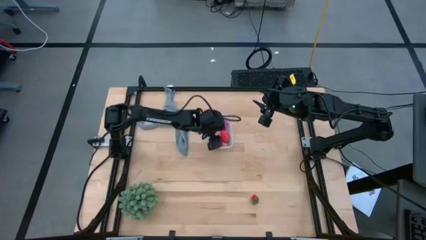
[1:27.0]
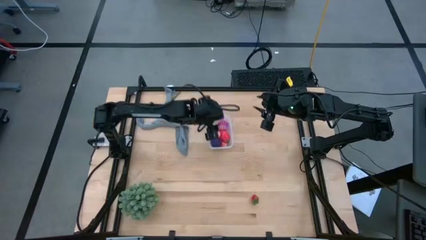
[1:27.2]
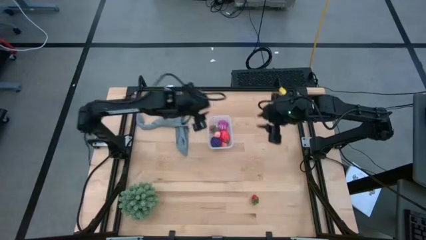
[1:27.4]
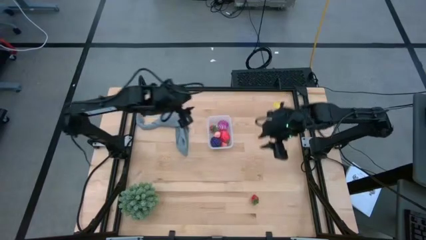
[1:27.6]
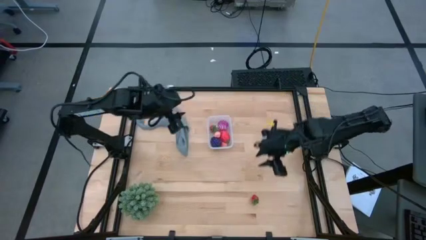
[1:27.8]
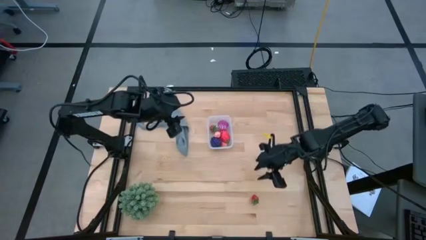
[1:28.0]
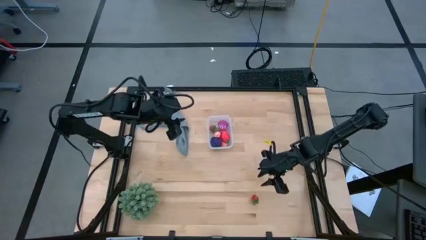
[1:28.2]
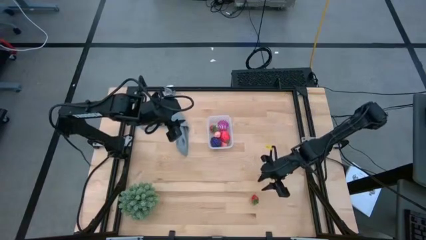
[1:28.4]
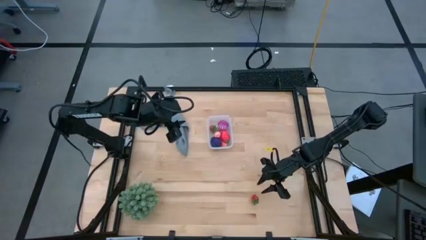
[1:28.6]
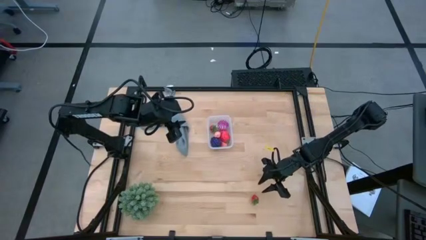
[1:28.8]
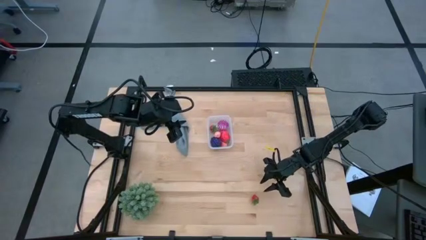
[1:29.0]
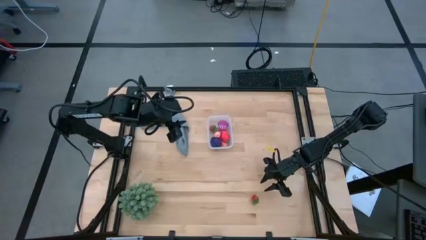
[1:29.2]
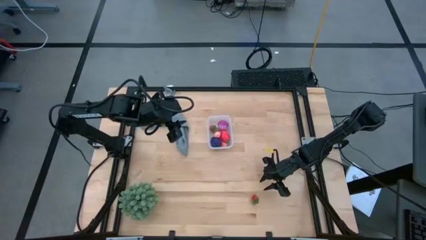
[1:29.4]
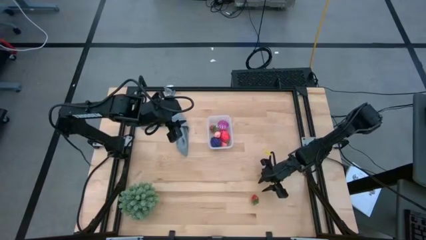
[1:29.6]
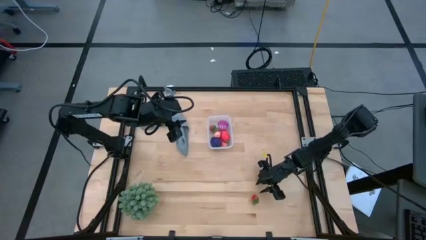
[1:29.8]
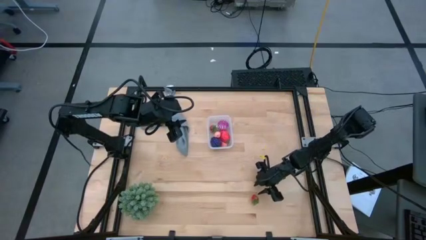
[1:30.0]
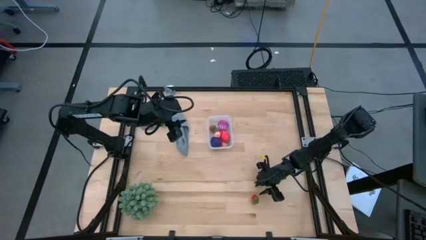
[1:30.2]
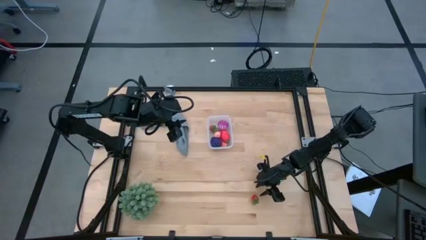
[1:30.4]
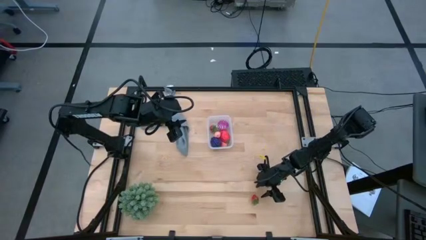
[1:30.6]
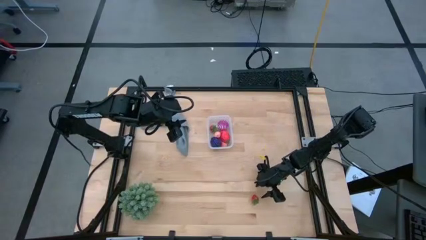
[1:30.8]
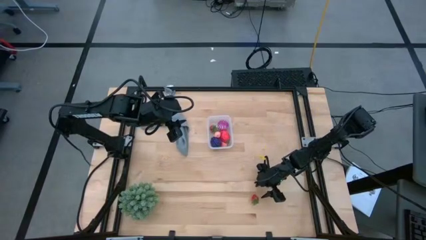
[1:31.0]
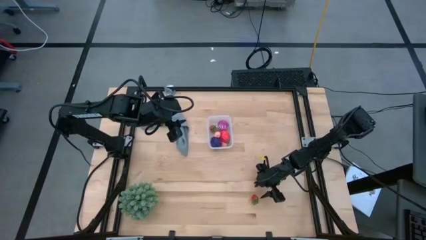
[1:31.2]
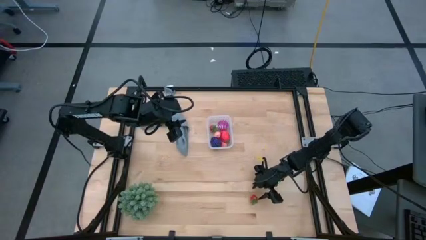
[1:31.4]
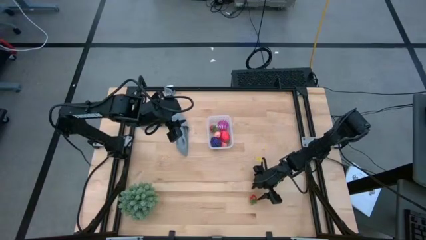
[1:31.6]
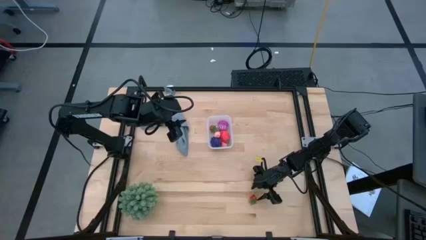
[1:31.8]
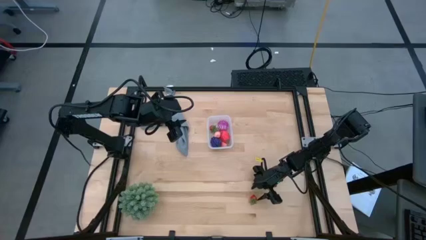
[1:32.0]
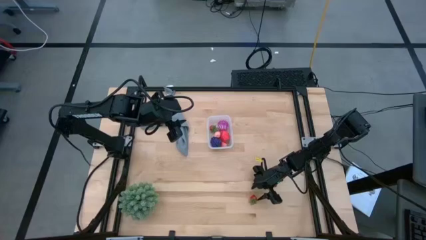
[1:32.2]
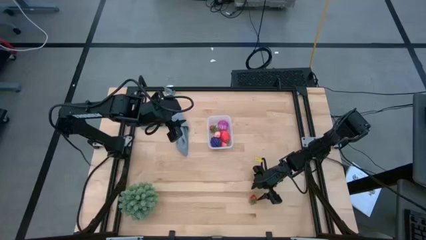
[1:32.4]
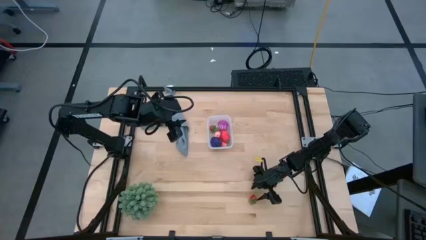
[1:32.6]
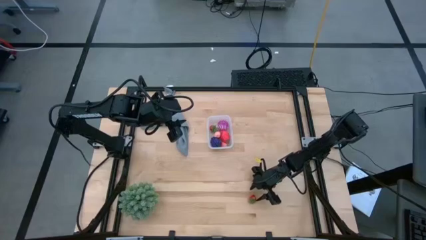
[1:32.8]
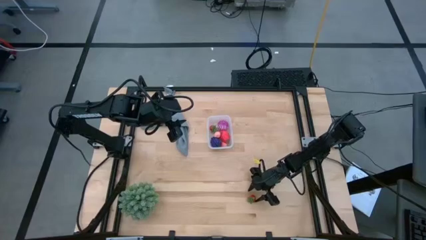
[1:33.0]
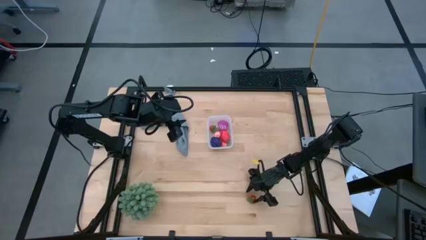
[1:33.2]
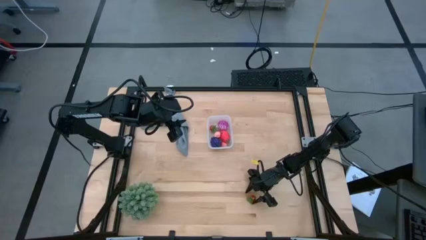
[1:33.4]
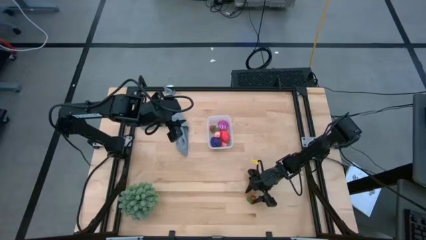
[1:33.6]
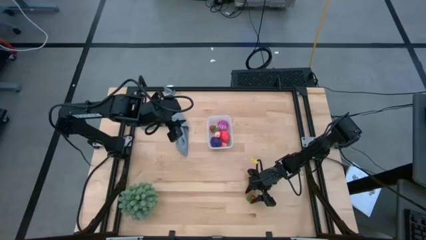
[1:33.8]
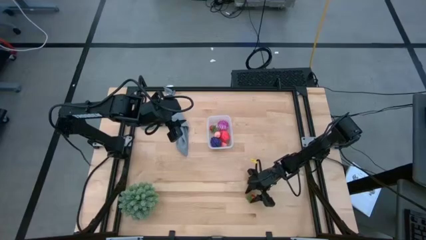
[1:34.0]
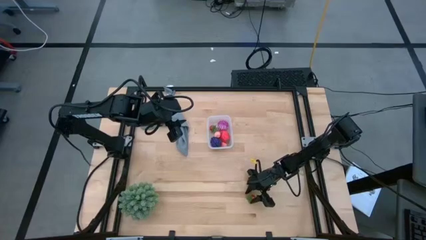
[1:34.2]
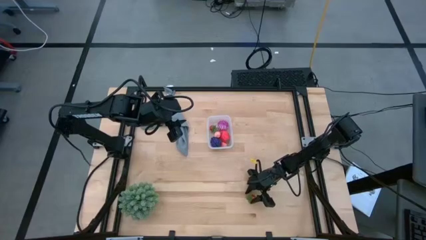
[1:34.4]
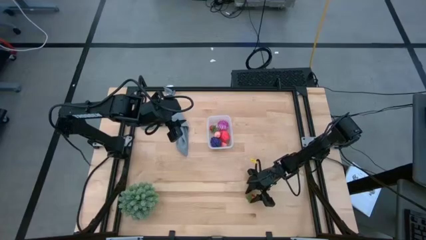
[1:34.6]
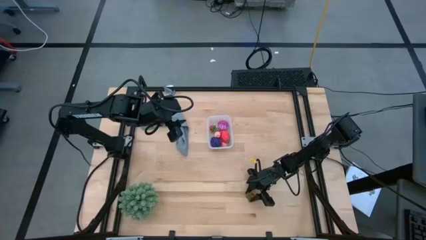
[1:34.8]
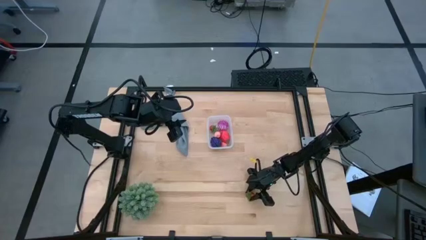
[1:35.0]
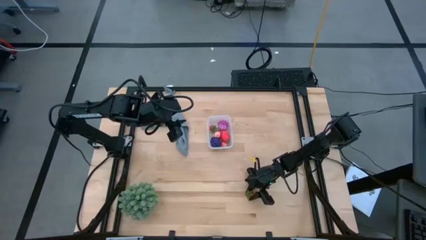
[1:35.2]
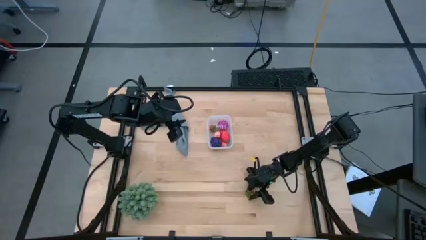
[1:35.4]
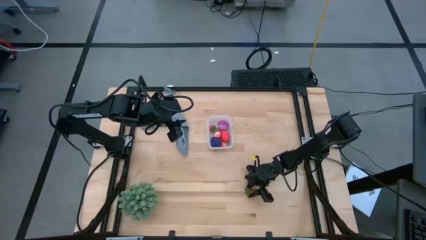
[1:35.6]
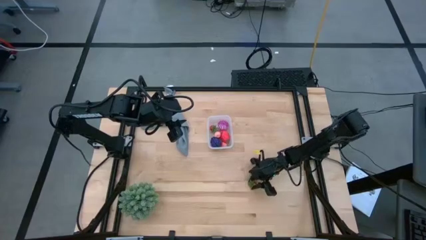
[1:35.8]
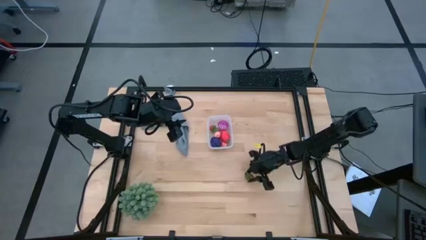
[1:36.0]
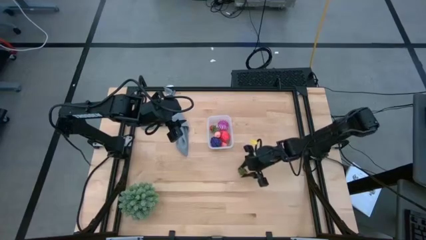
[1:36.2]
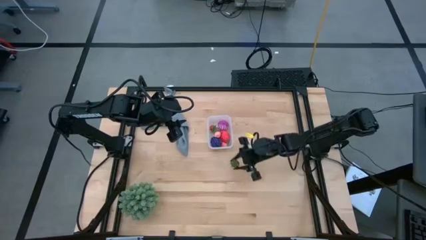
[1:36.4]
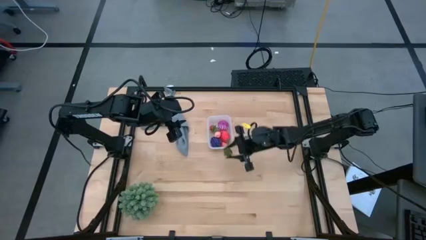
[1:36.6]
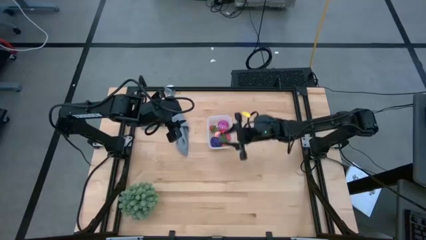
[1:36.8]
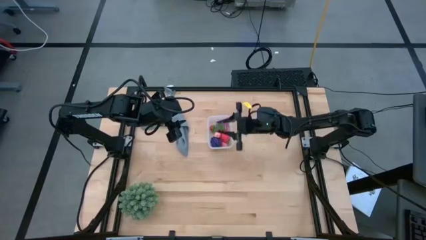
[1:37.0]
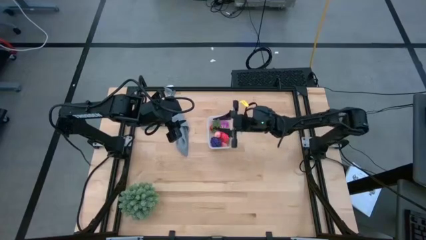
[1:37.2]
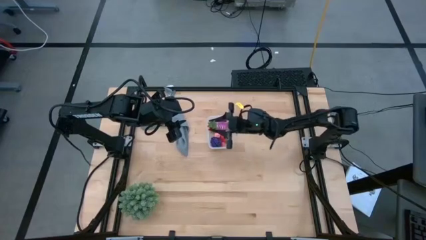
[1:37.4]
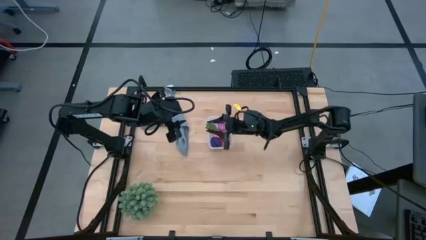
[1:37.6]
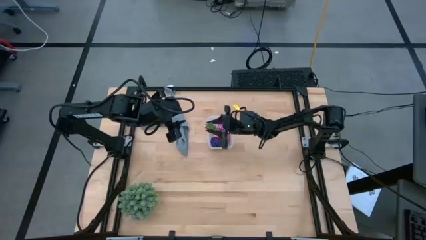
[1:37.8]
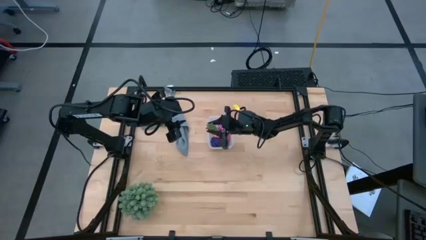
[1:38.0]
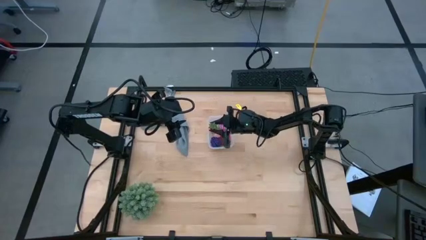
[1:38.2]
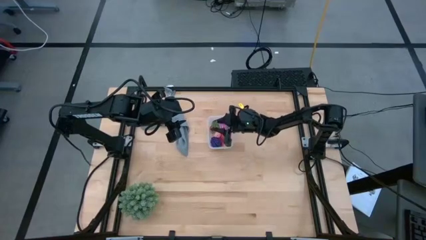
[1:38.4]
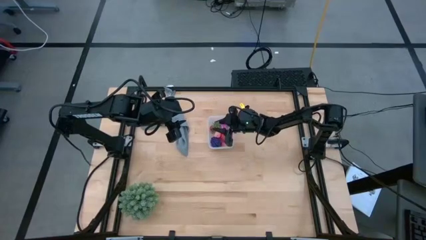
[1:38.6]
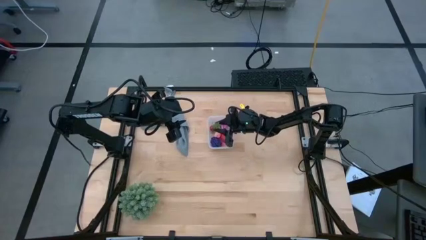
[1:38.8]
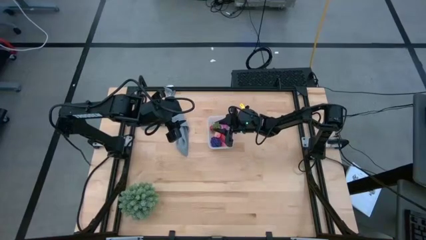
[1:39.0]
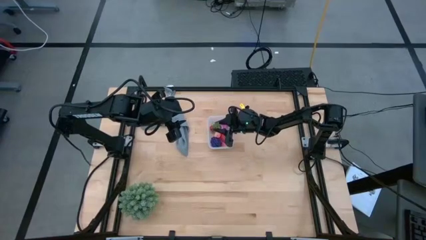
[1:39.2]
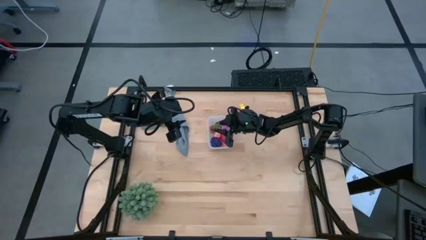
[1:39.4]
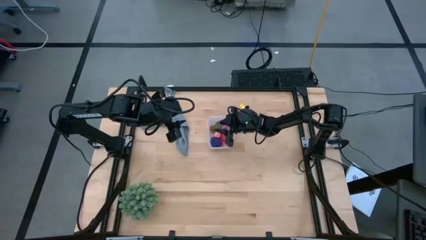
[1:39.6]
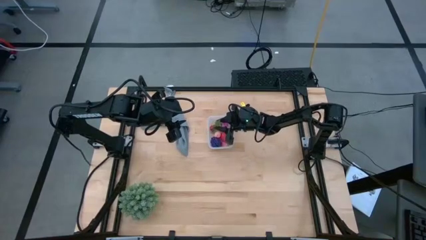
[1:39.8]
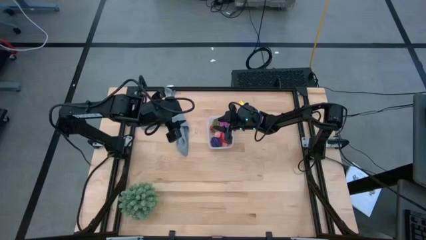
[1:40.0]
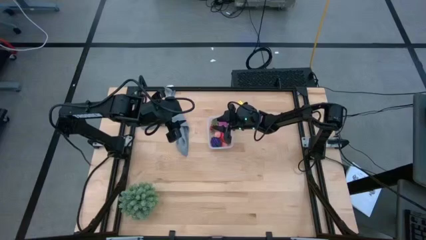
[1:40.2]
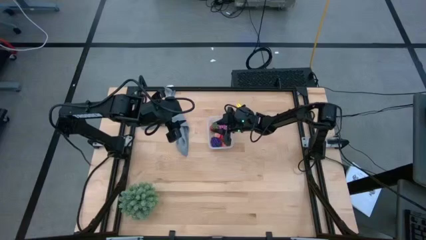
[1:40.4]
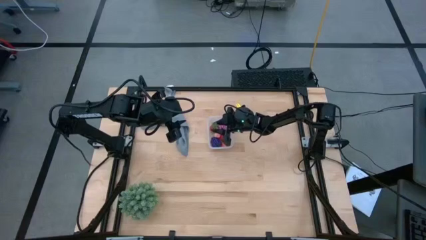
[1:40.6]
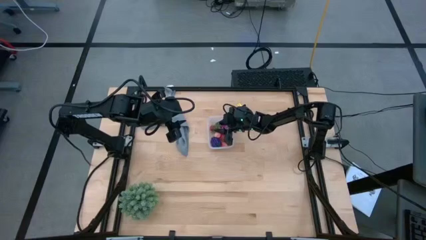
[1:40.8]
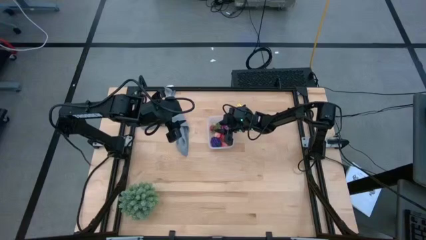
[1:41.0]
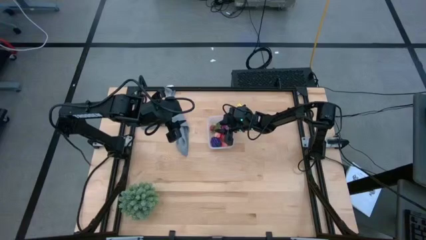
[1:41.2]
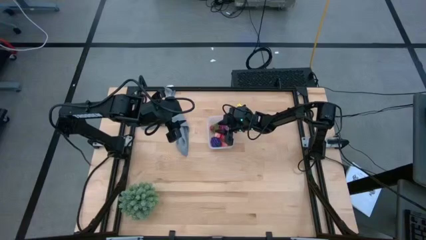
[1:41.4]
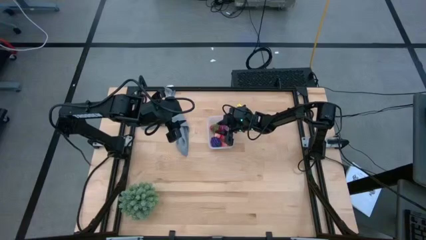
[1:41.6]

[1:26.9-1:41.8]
Task: Pick and placing Produce into tupperware
Put the red strawberry into the transparent bin
